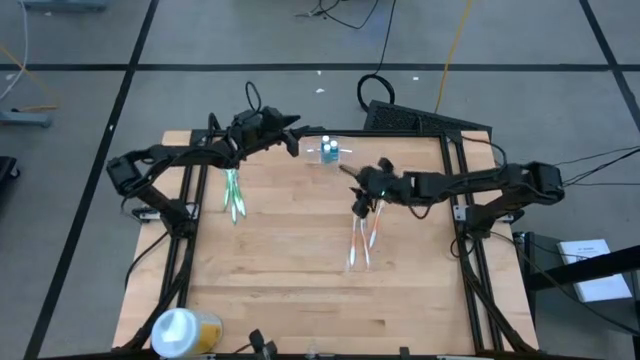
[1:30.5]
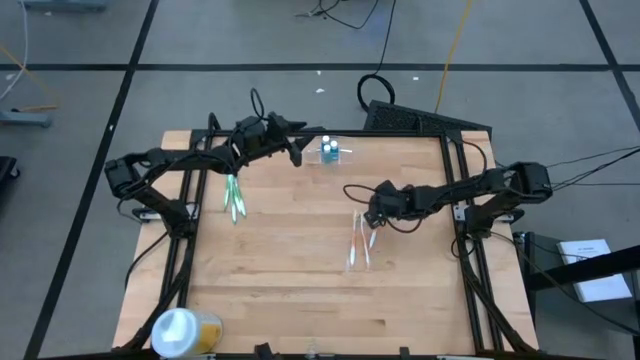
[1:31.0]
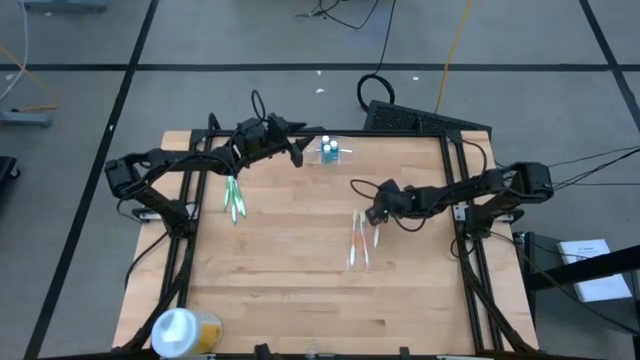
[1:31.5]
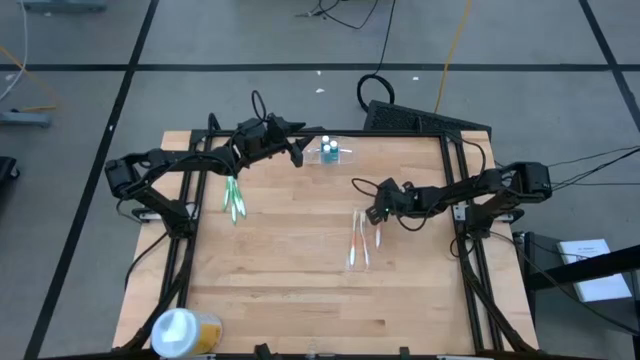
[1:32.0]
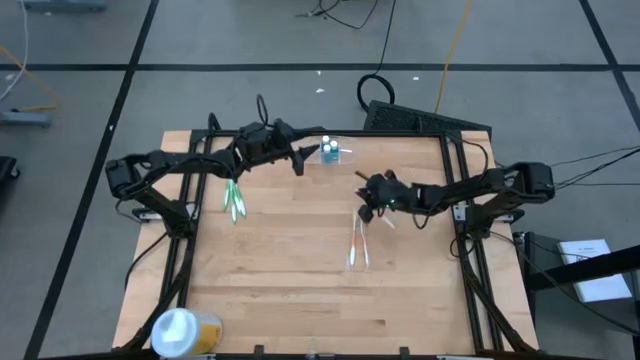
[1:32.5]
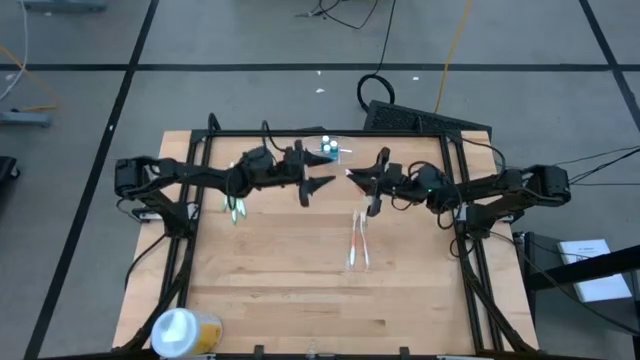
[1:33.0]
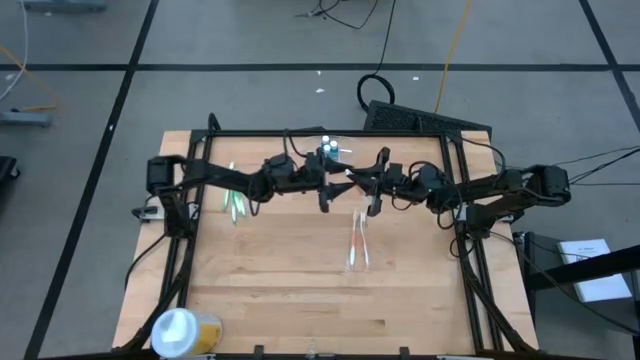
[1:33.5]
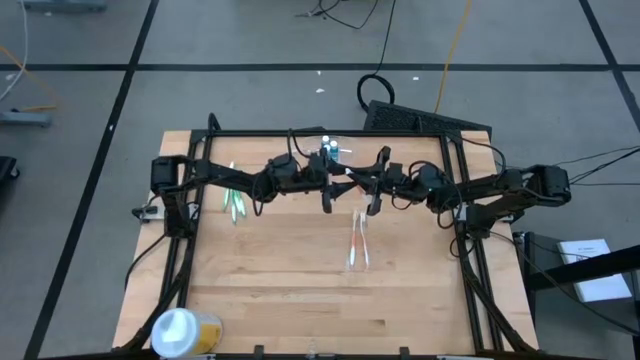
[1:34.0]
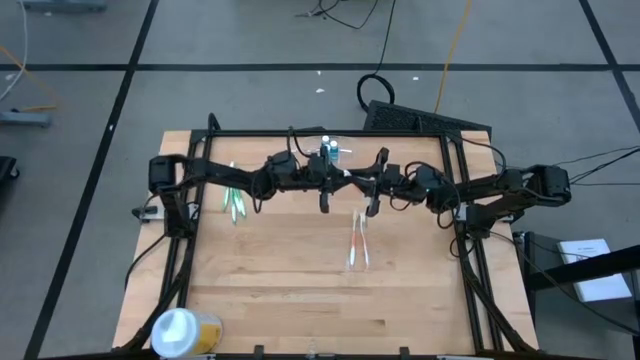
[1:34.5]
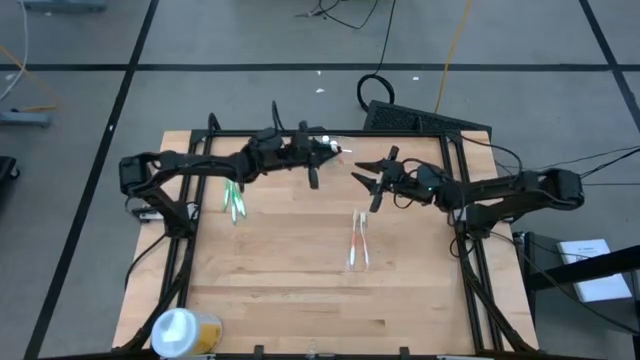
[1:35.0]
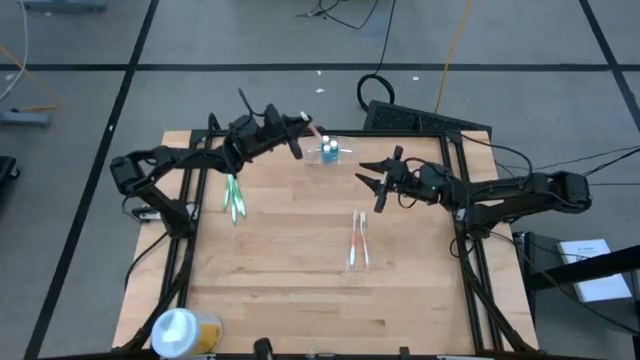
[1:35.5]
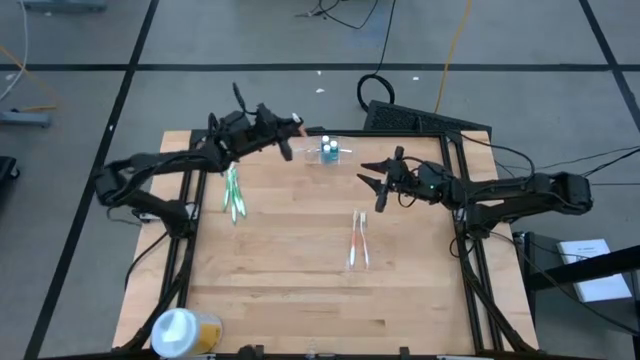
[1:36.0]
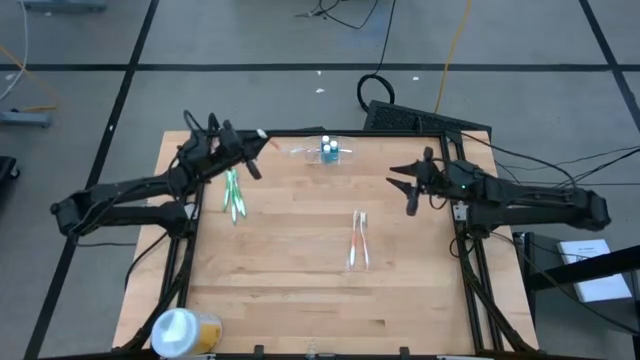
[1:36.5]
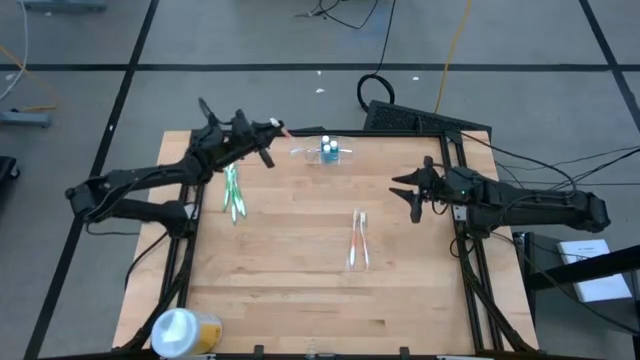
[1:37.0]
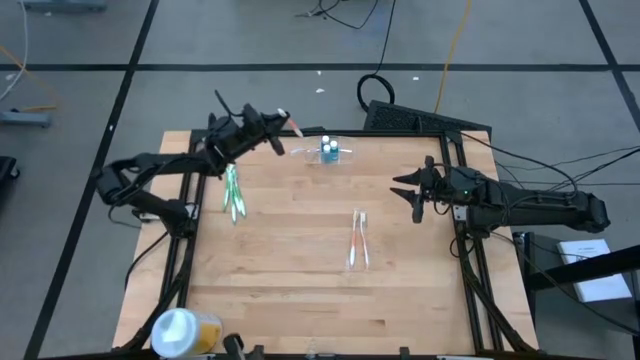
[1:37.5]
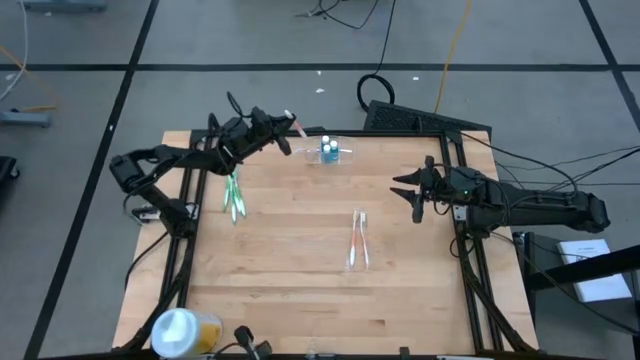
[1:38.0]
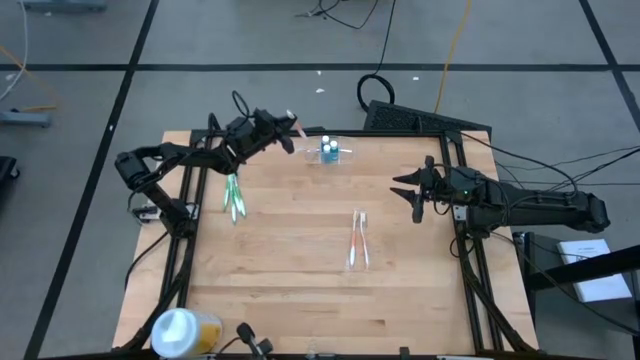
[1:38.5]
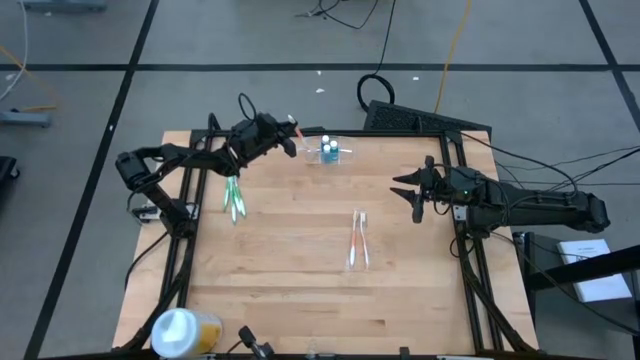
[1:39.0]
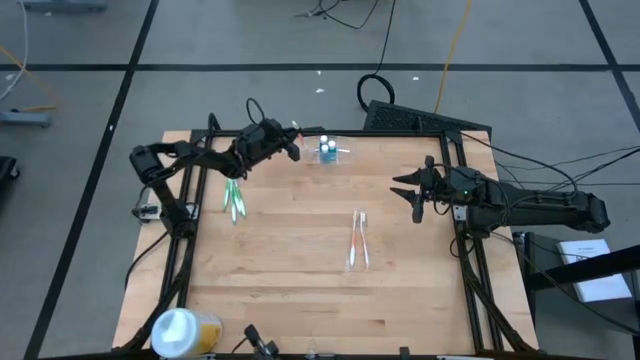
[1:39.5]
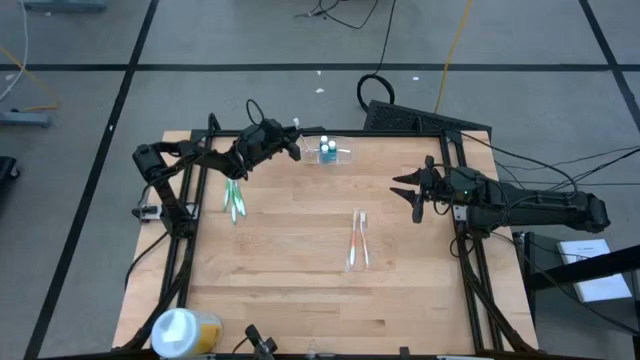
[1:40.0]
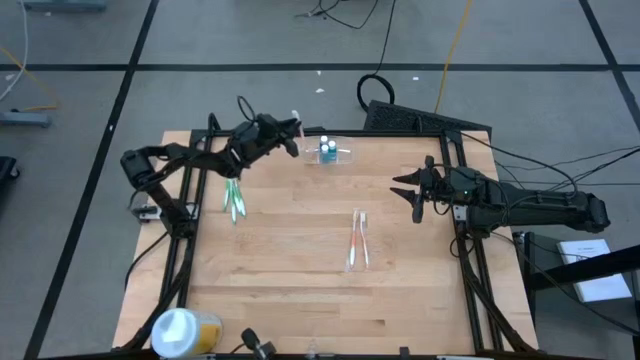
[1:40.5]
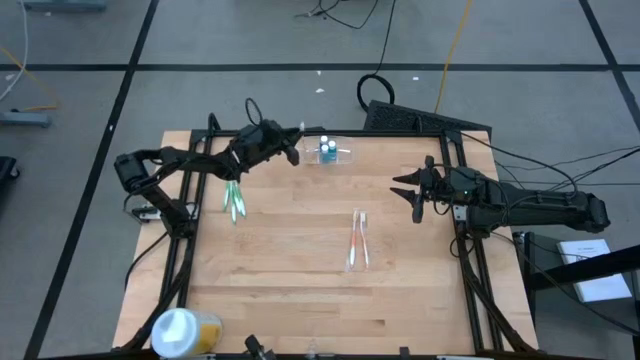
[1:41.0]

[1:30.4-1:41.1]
Task: Pick & Place toothbrushing station
Put the orange toothbrush into the transparent organizer

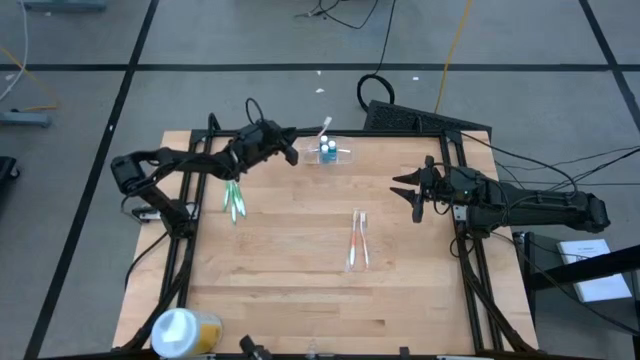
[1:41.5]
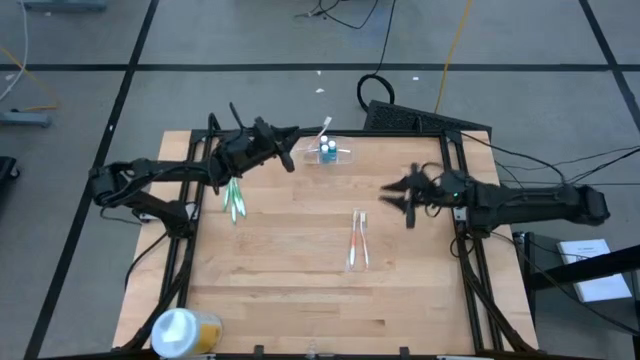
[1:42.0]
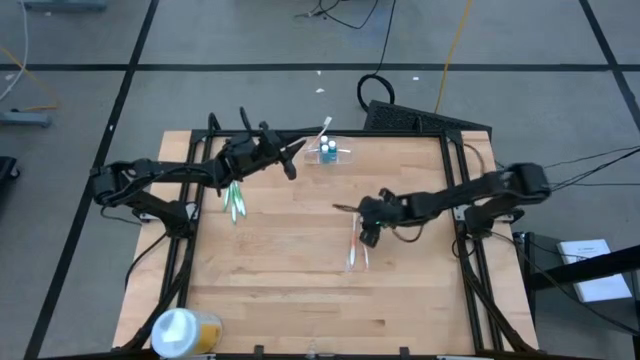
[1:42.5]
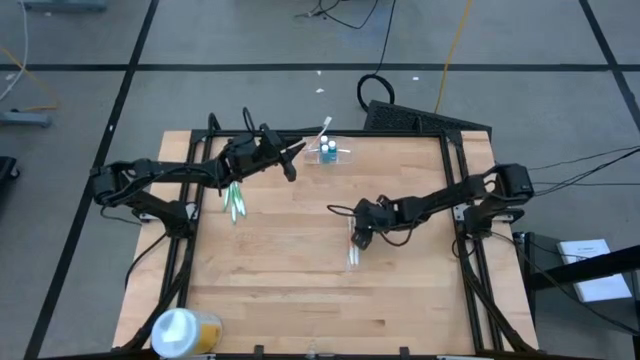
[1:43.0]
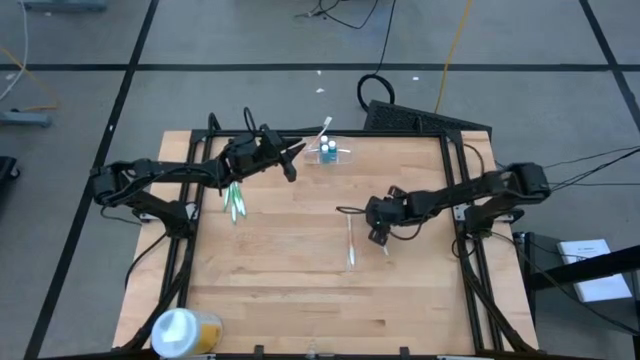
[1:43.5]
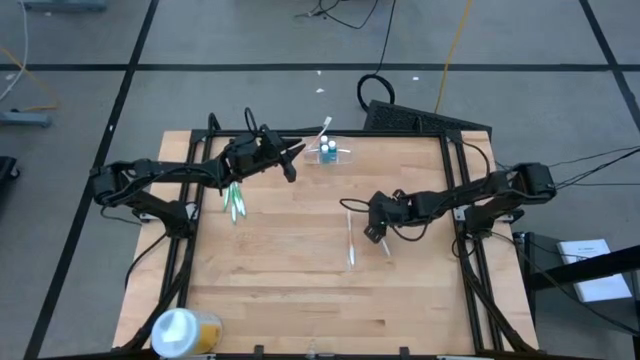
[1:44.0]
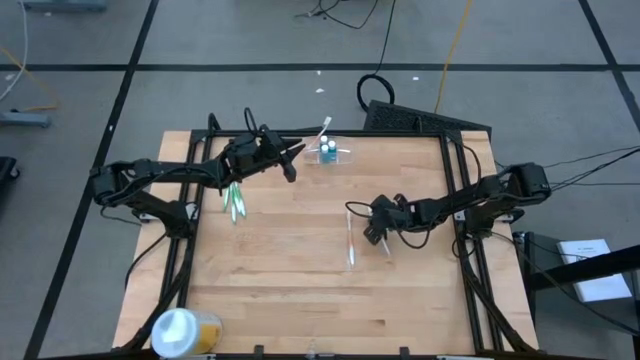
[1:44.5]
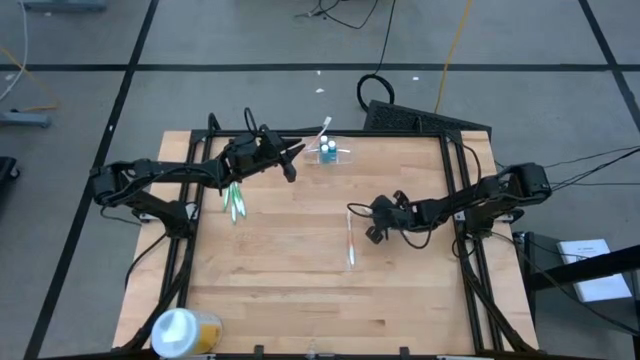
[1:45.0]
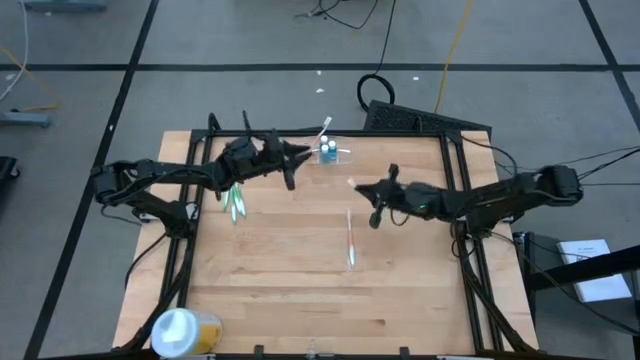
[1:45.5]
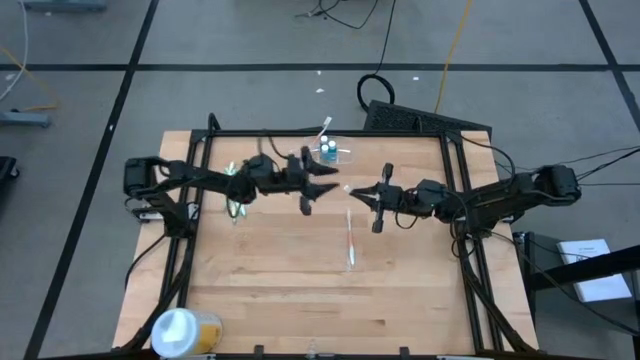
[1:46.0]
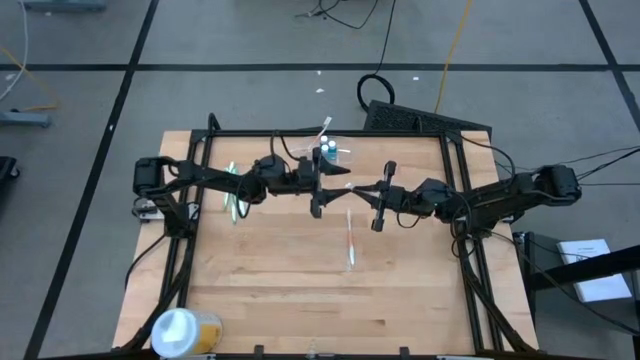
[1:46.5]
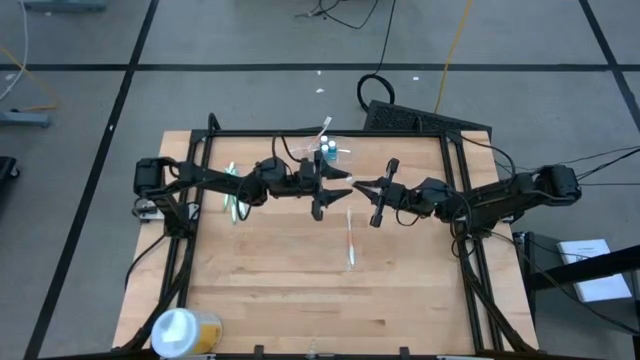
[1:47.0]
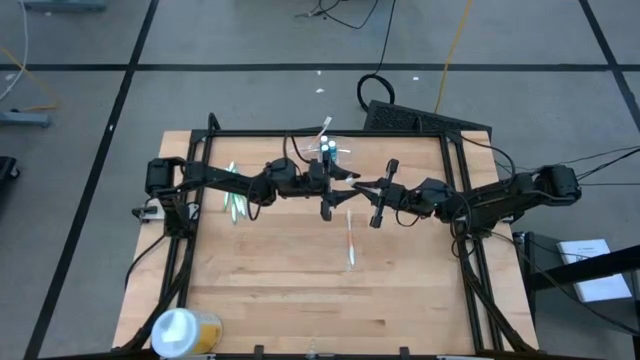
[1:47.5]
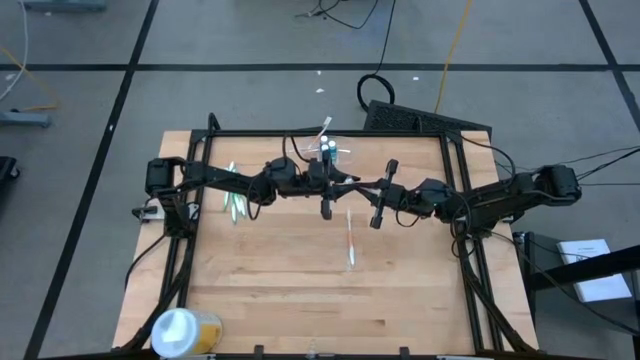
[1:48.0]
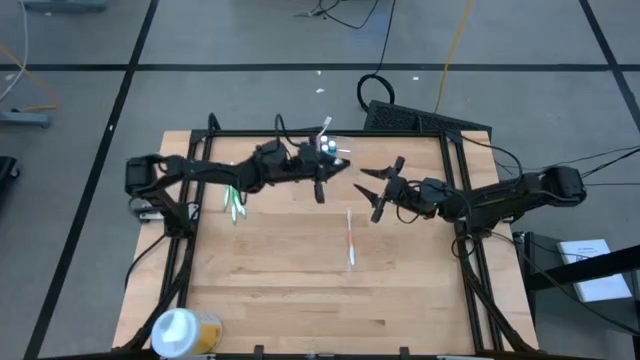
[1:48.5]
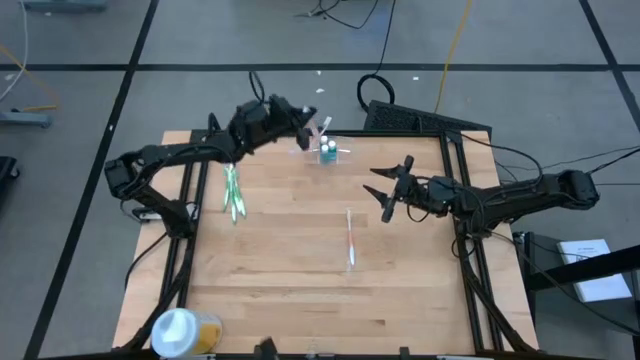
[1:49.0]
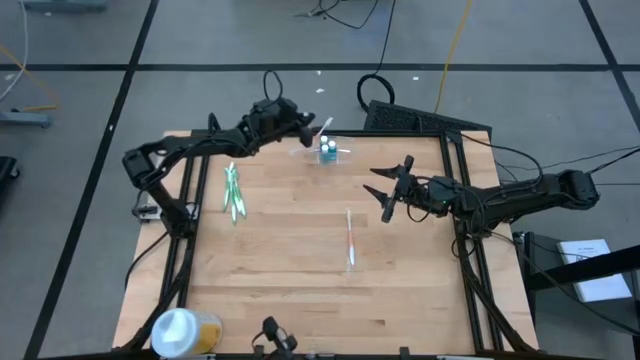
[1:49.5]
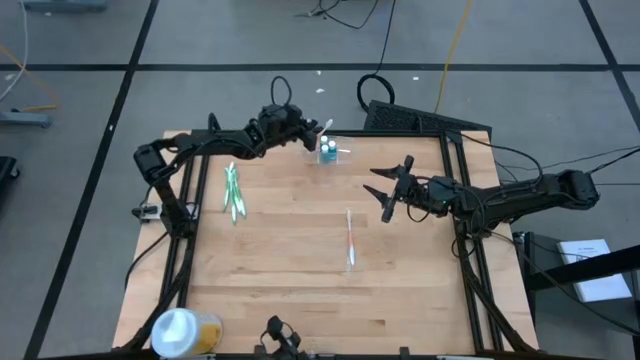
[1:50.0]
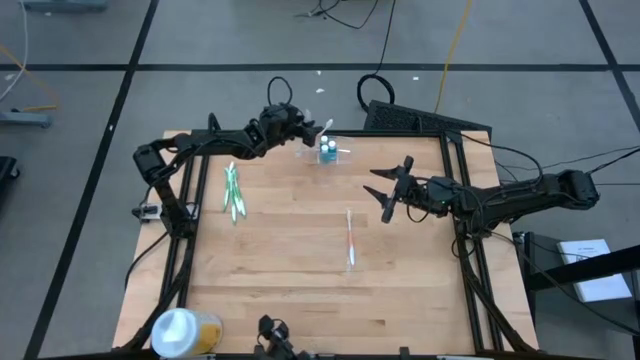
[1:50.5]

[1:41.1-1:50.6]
Put the orange toothbrush into the transparent organizer

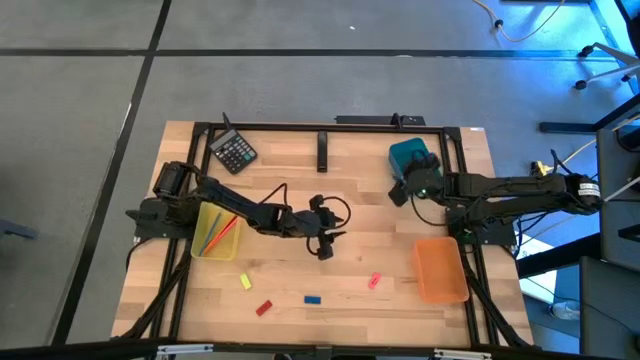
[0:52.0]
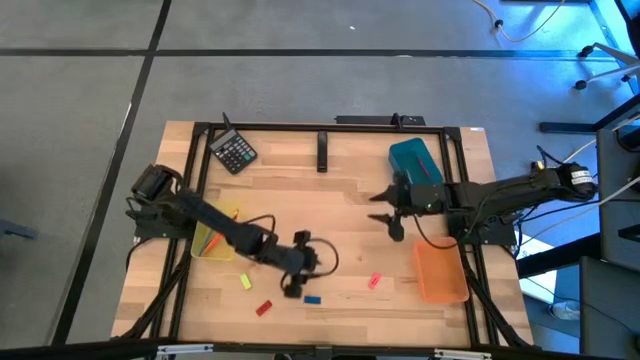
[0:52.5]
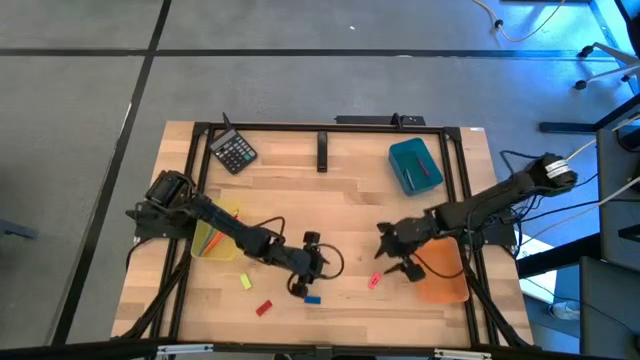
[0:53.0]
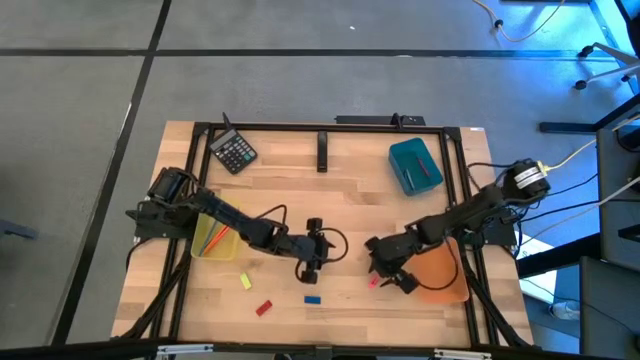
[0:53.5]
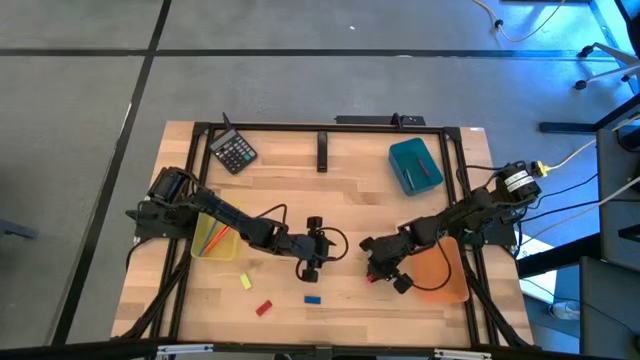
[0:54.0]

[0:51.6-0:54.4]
Task: Sort crayons/erasers/pens/pencils in bins
Put the pink eraser into the orange bin
